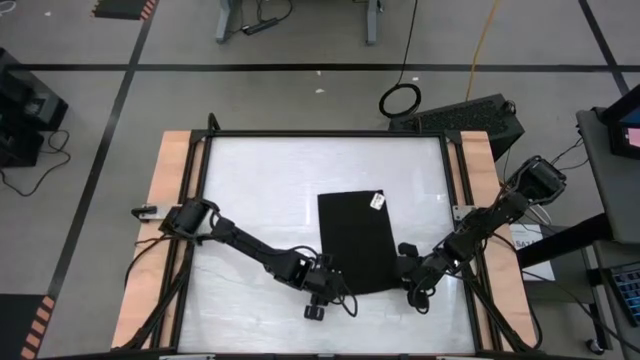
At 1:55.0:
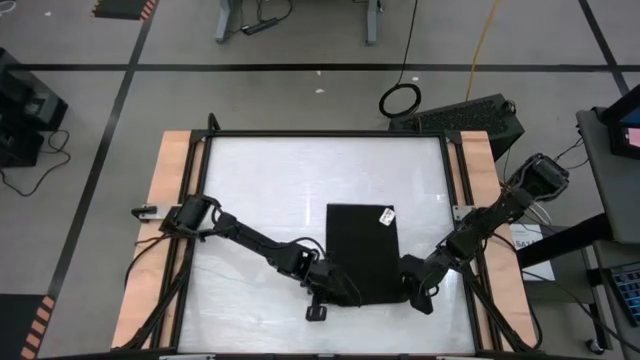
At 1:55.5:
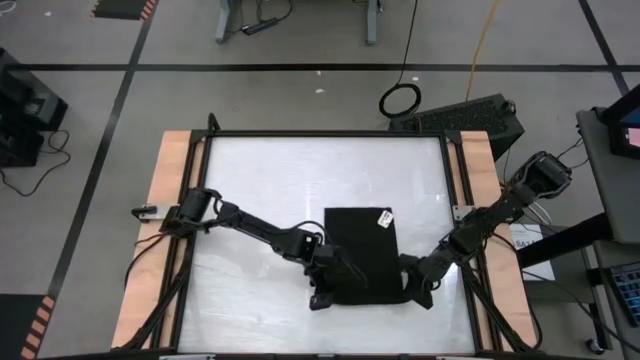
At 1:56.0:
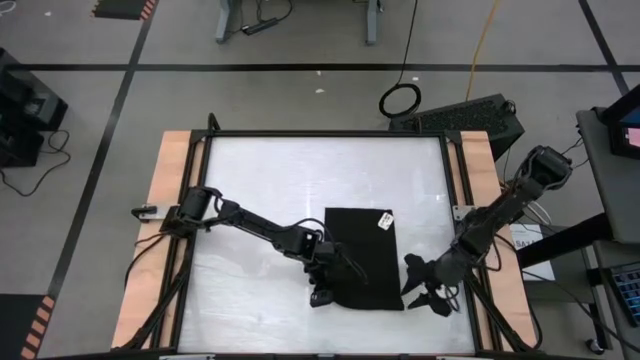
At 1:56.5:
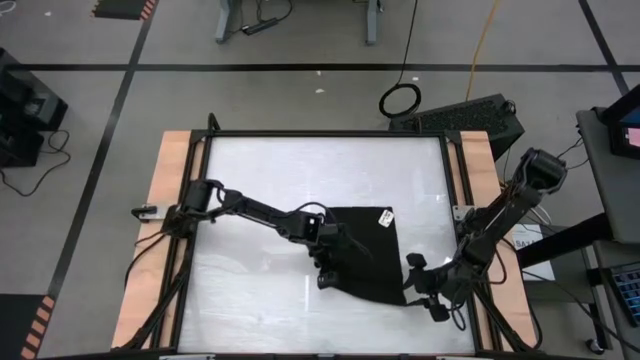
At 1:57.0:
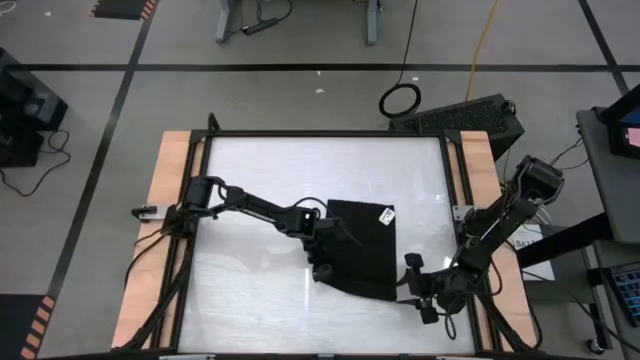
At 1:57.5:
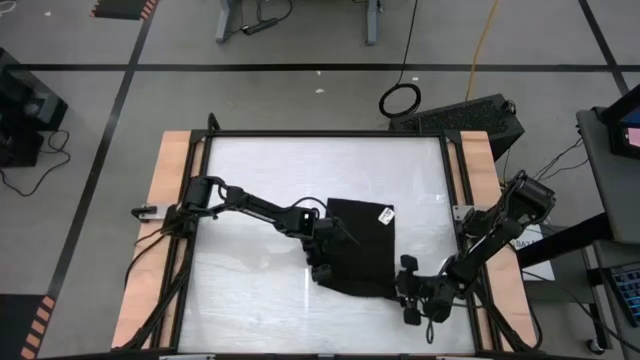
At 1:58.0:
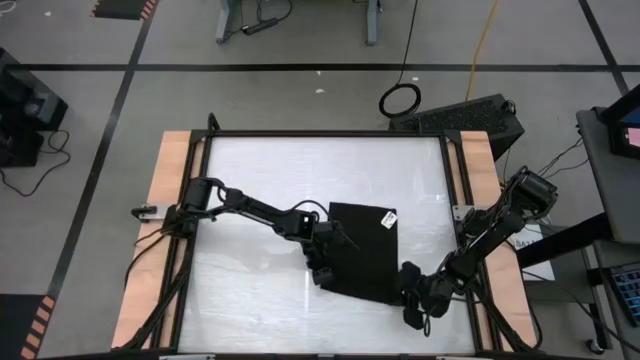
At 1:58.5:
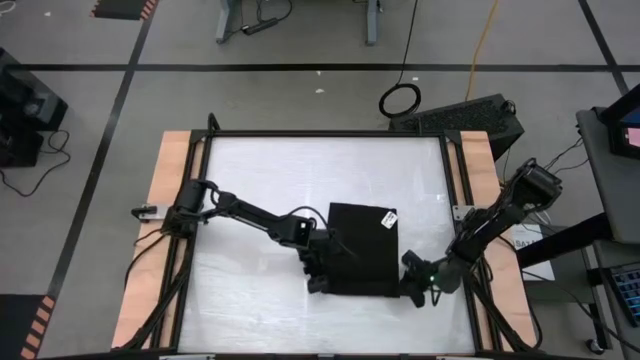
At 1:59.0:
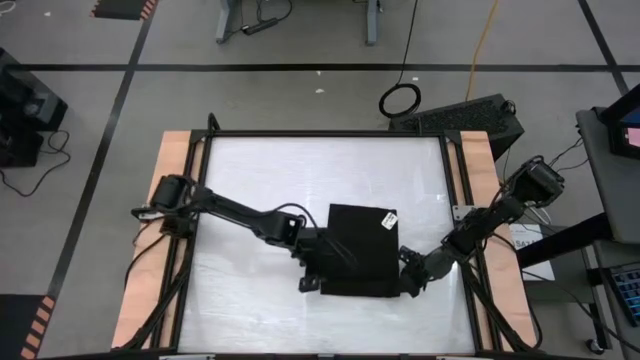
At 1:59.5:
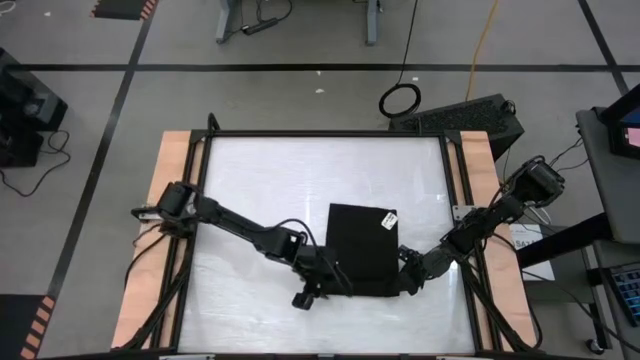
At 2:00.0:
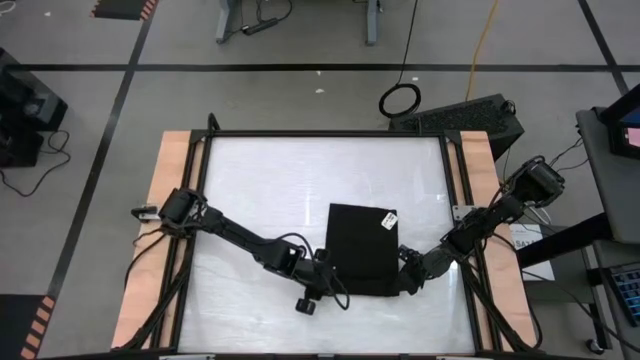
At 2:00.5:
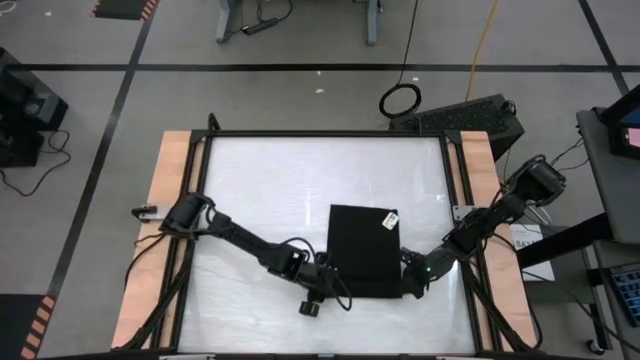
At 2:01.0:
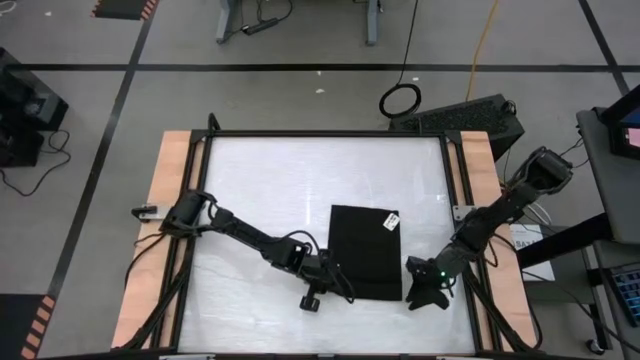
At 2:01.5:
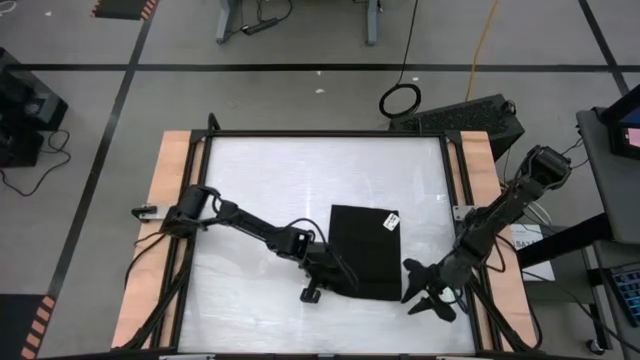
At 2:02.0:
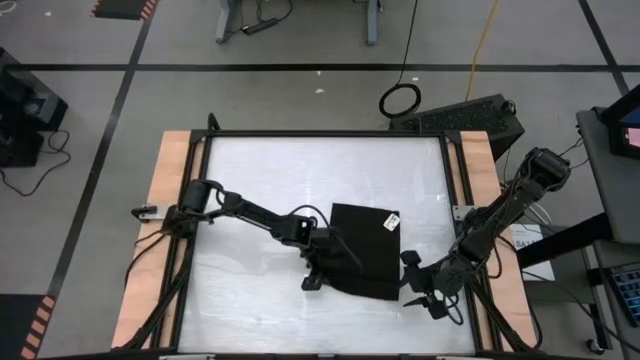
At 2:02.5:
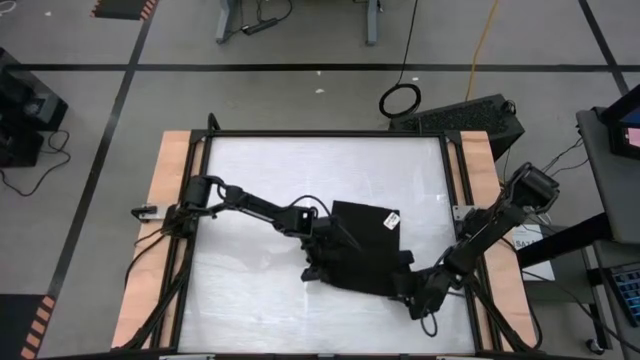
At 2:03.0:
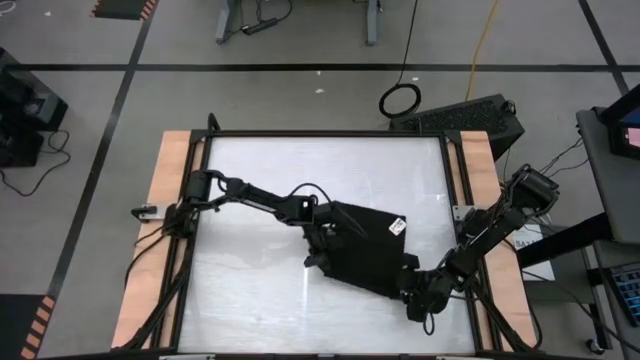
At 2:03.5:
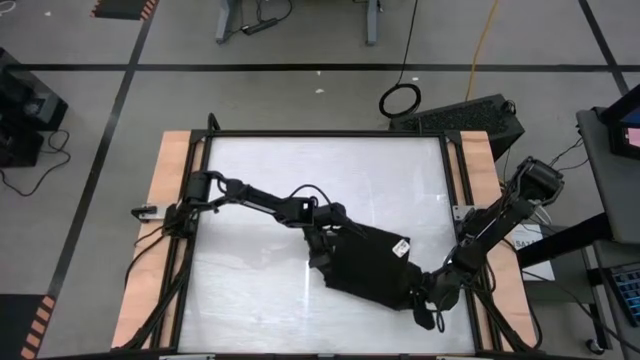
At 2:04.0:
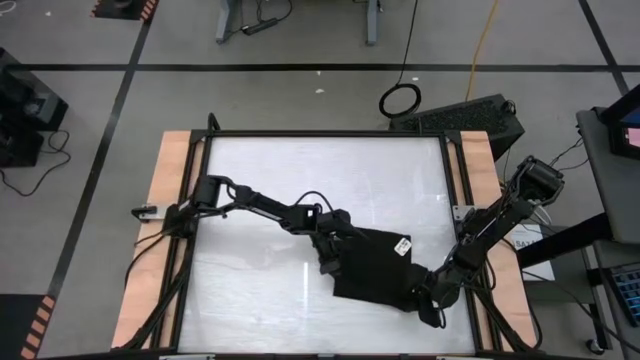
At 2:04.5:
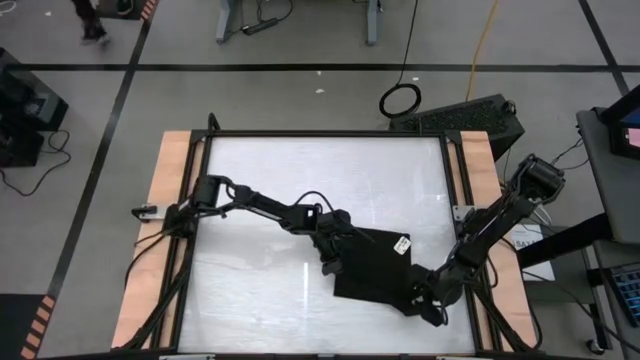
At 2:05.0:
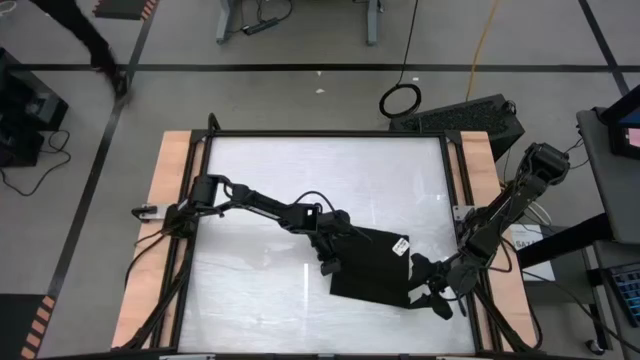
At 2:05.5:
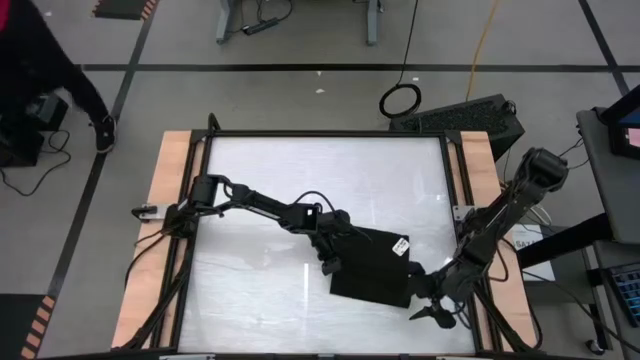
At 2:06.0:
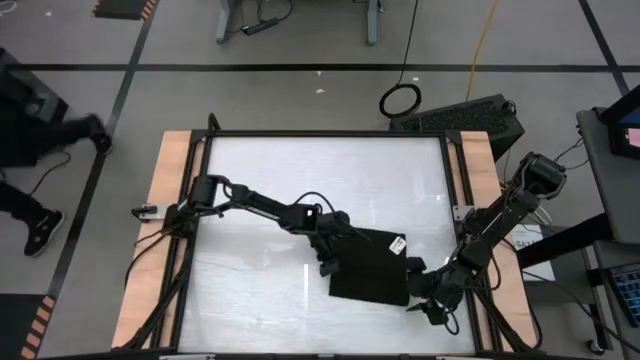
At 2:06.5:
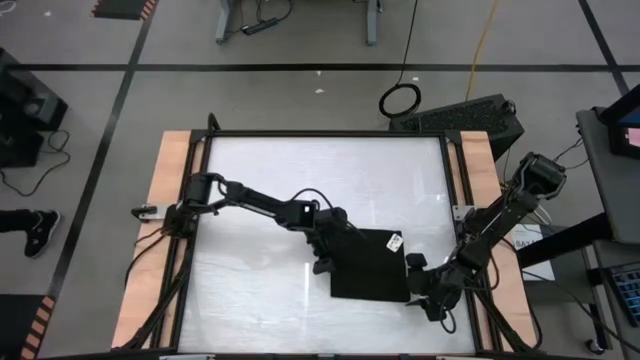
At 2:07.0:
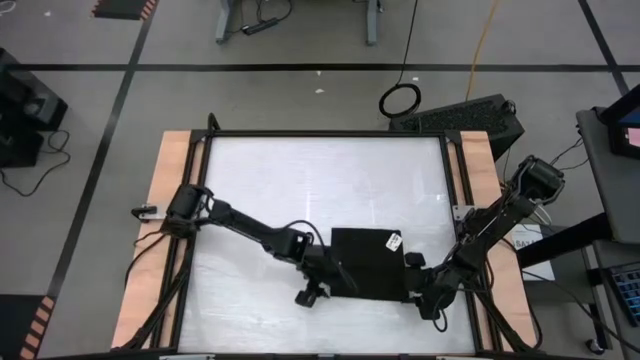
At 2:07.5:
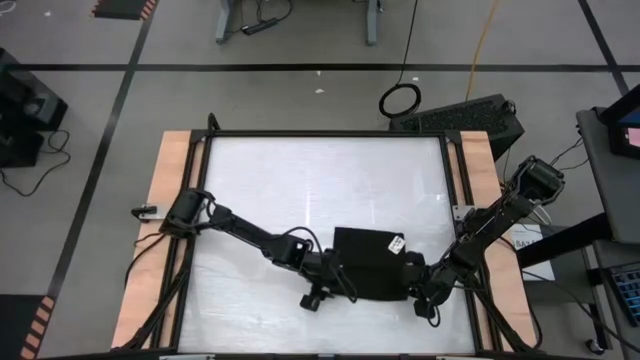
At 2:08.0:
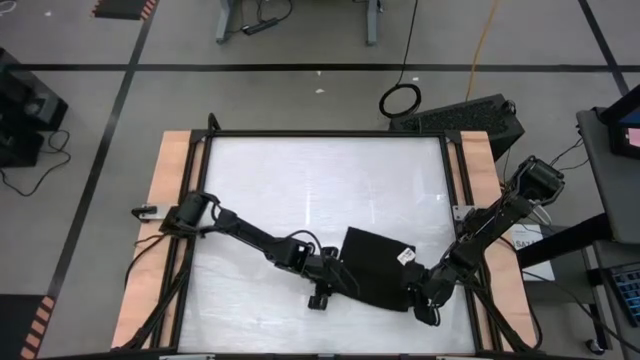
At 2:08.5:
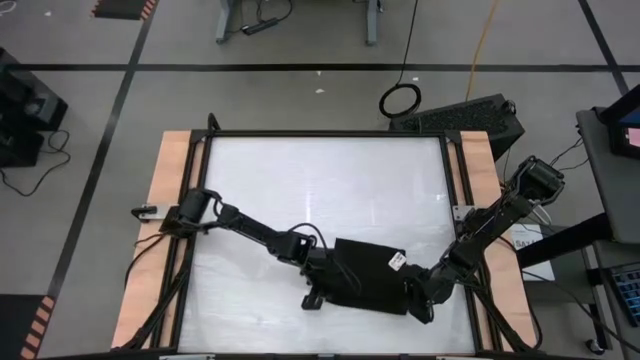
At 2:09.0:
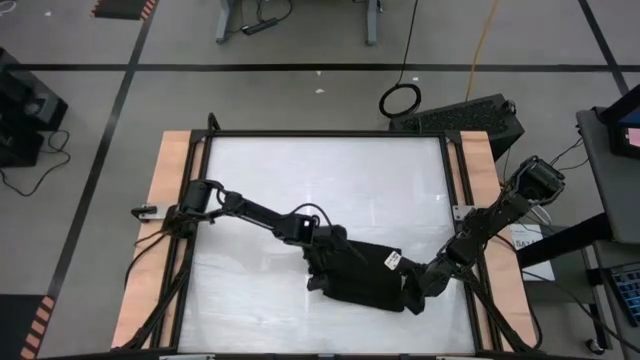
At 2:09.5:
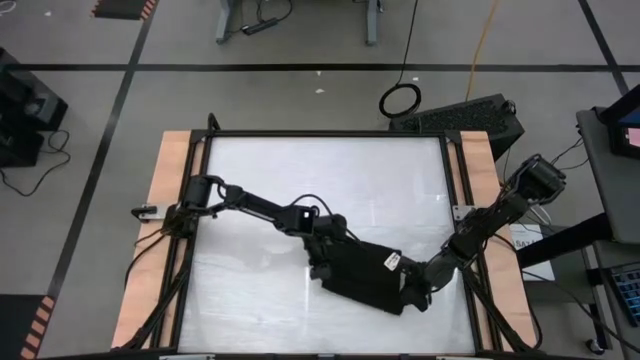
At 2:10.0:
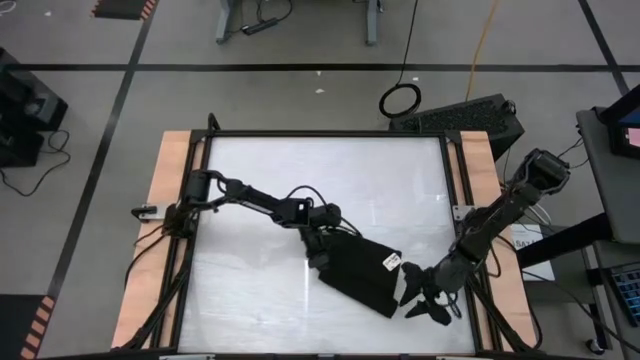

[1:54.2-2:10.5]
Task: Roll towel into tight, uniform cylinder
Roll the black towel

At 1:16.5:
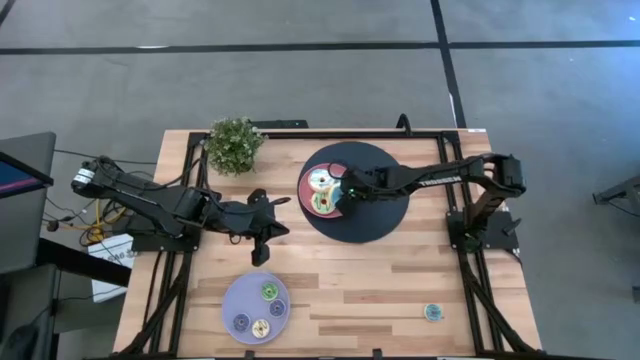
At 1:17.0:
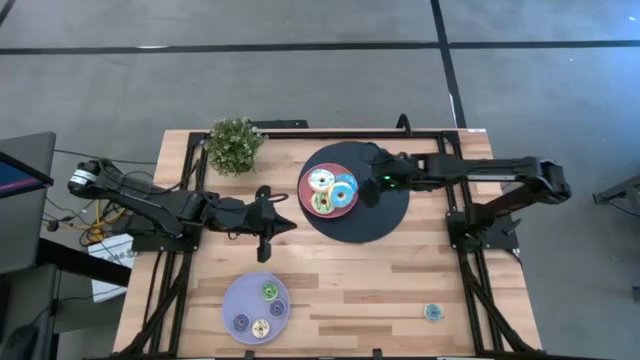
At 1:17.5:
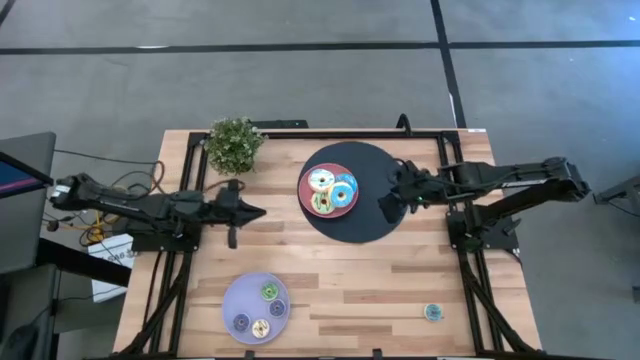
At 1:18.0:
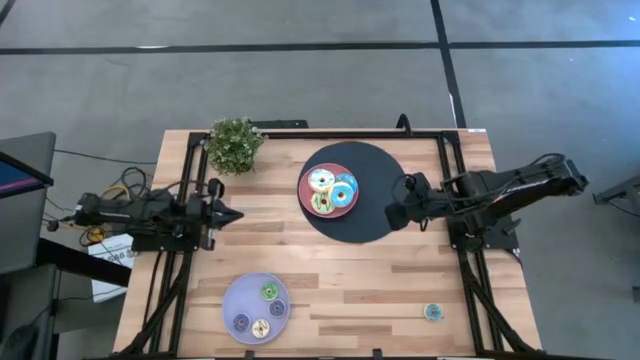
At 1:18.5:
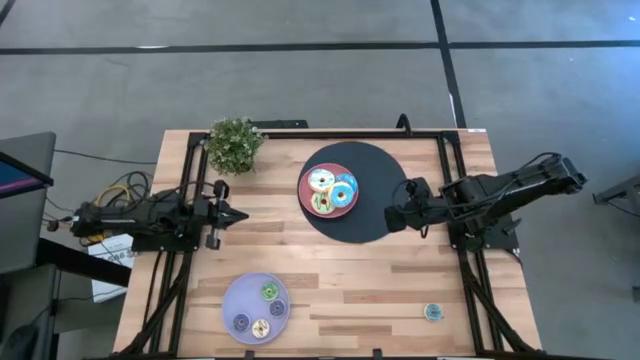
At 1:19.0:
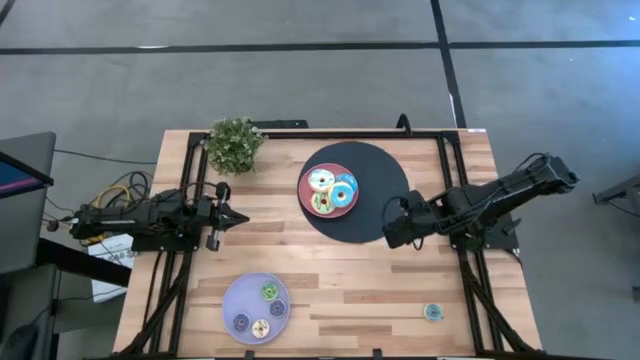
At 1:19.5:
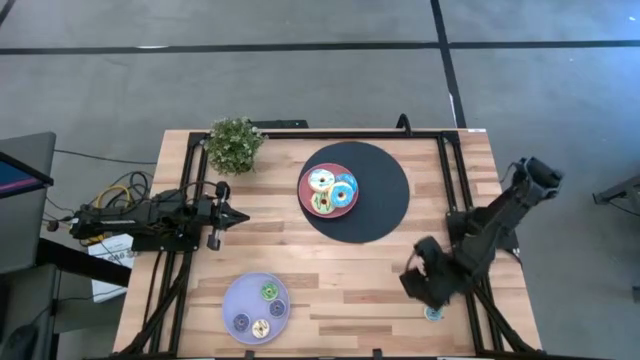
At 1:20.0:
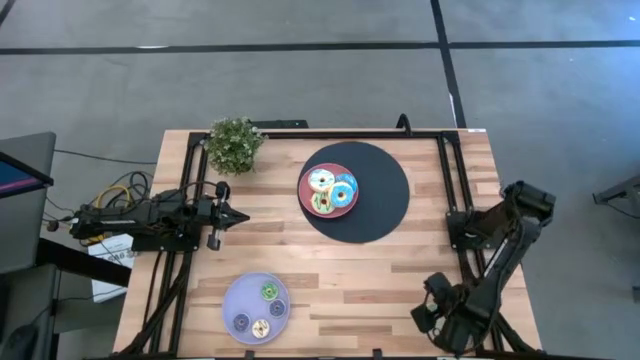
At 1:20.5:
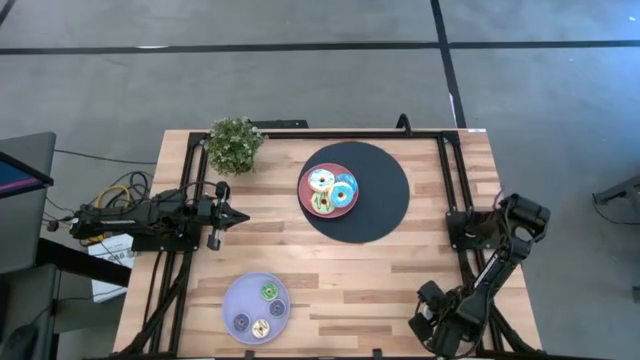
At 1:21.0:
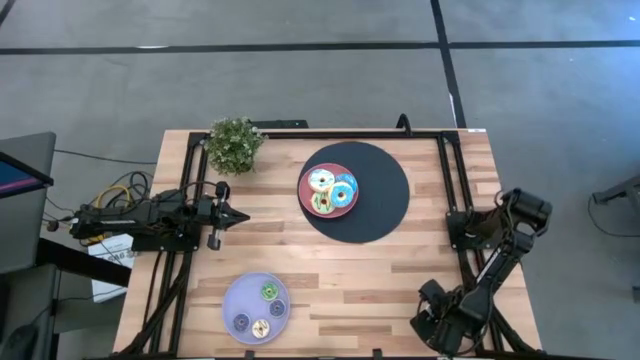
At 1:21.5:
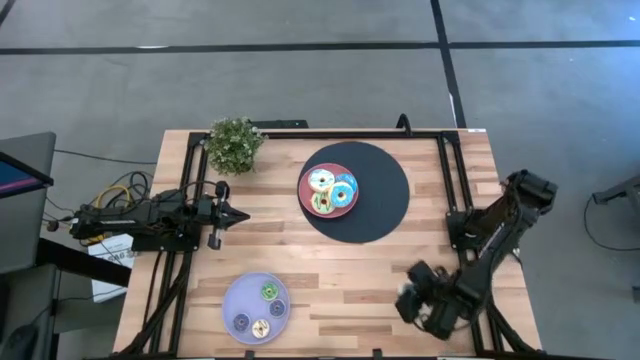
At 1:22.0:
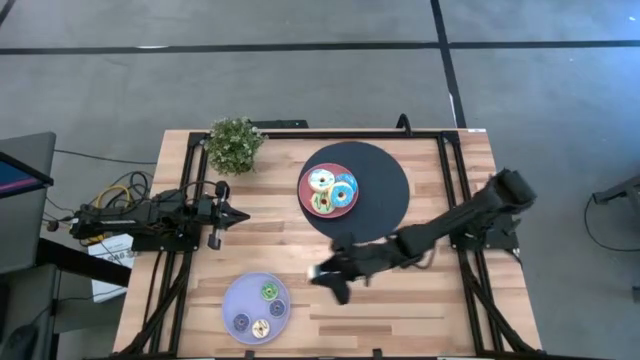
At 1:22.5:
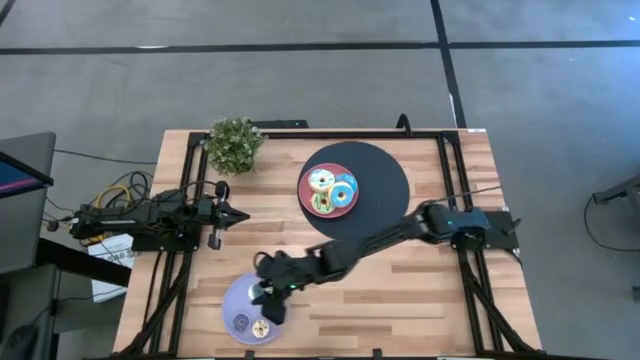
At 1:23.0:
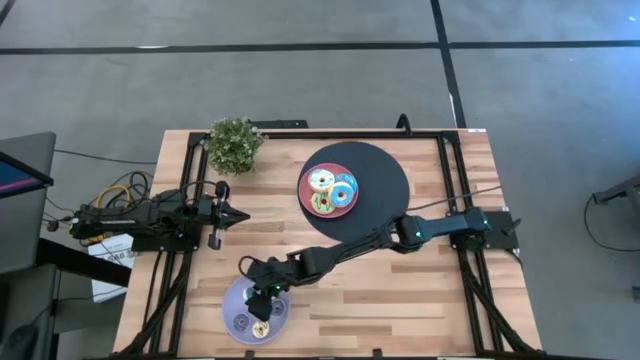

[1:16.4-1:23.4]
Task: Pick & Place donuts
Put the small blue donut on the purple plate
